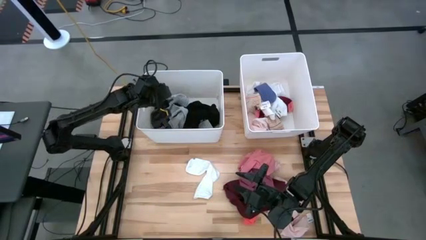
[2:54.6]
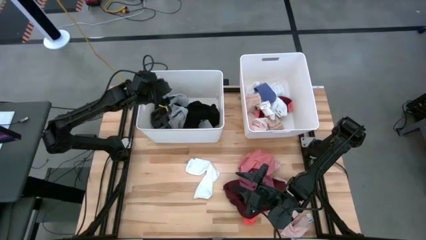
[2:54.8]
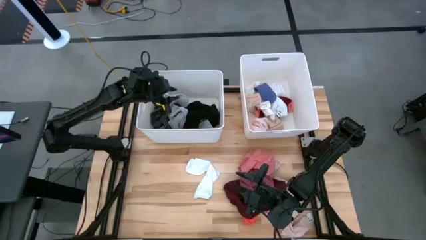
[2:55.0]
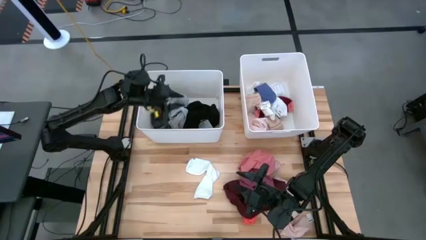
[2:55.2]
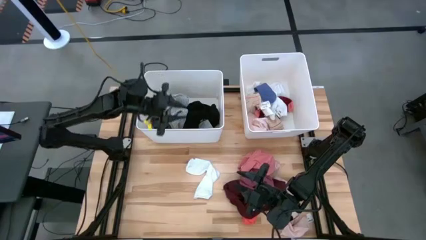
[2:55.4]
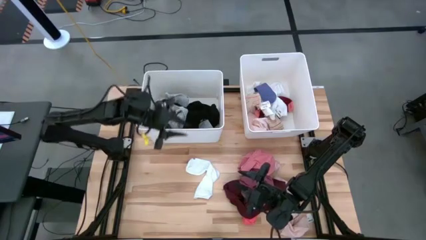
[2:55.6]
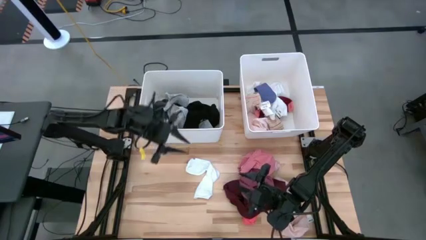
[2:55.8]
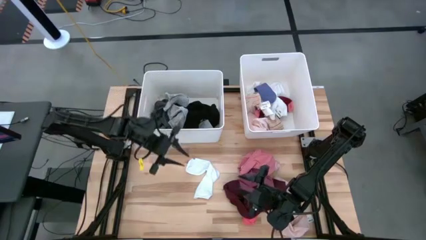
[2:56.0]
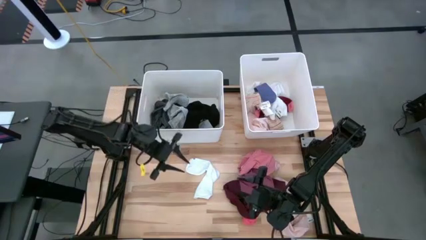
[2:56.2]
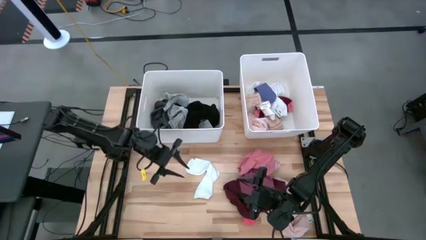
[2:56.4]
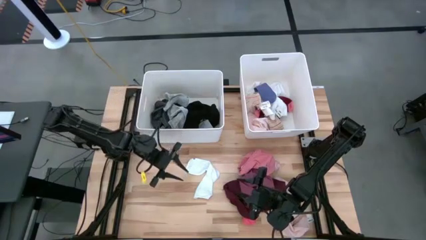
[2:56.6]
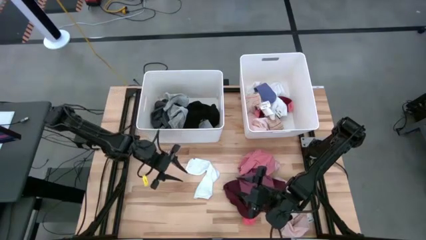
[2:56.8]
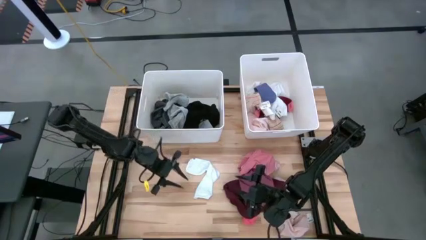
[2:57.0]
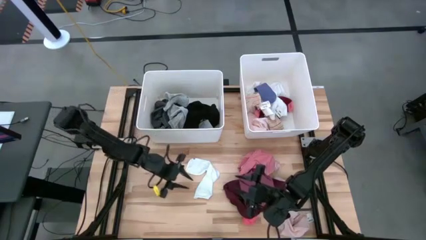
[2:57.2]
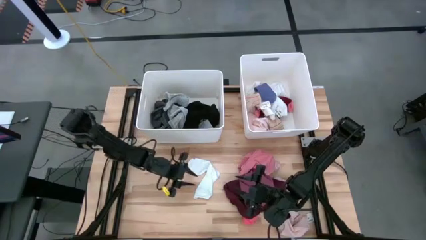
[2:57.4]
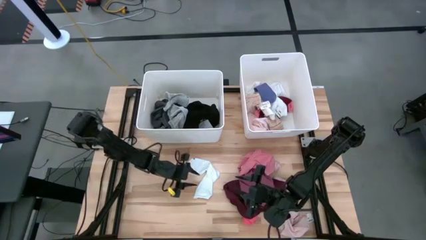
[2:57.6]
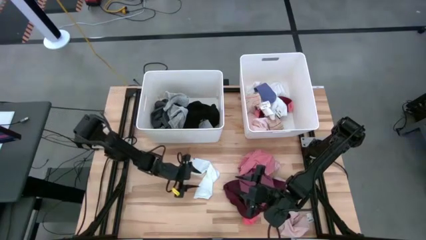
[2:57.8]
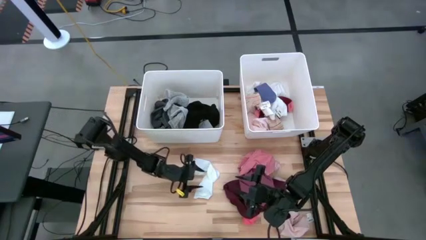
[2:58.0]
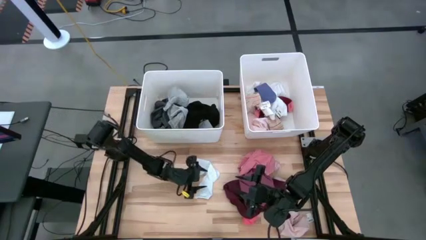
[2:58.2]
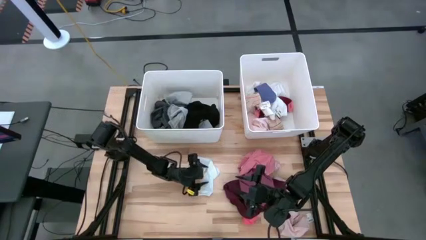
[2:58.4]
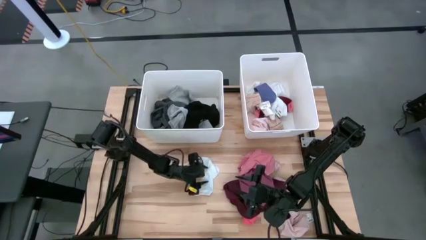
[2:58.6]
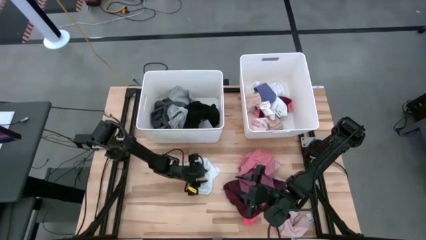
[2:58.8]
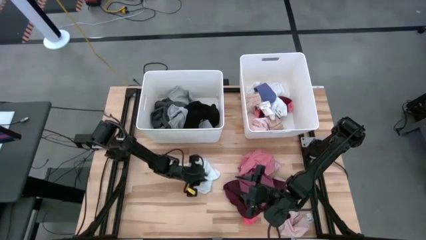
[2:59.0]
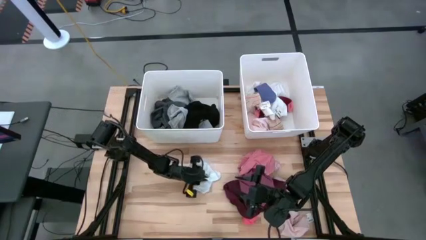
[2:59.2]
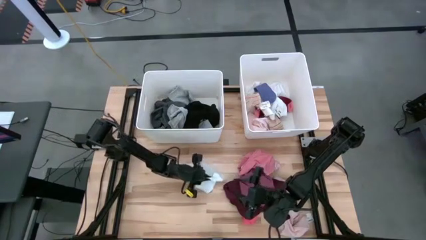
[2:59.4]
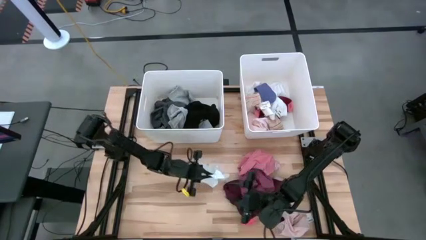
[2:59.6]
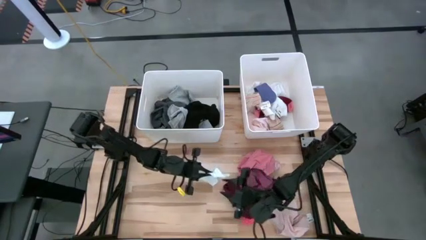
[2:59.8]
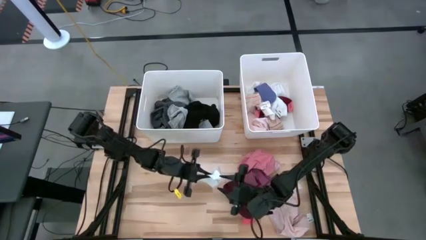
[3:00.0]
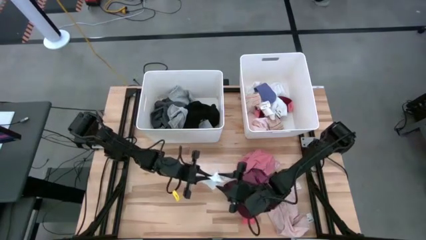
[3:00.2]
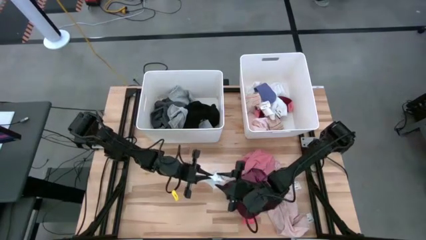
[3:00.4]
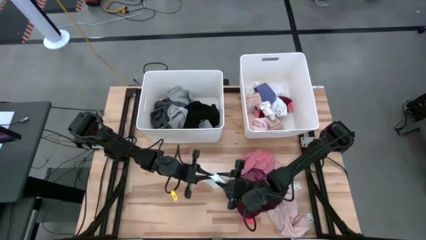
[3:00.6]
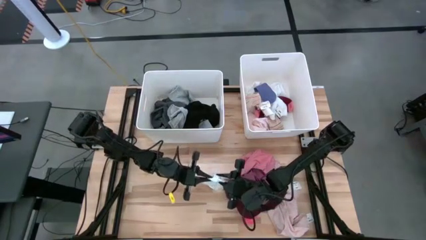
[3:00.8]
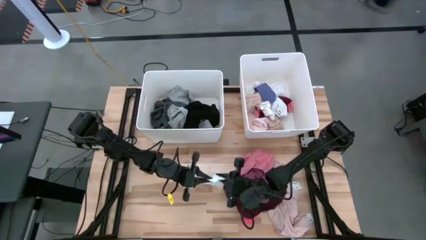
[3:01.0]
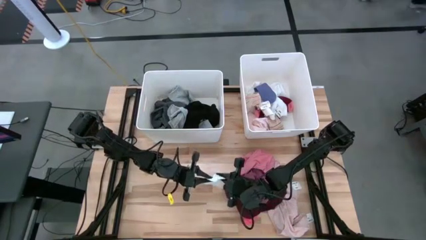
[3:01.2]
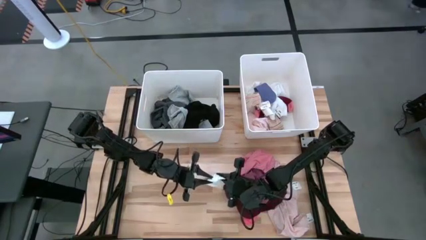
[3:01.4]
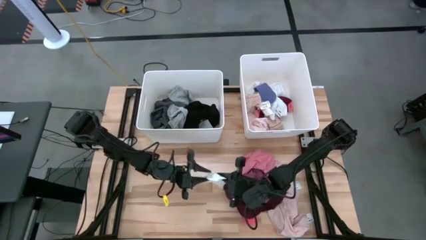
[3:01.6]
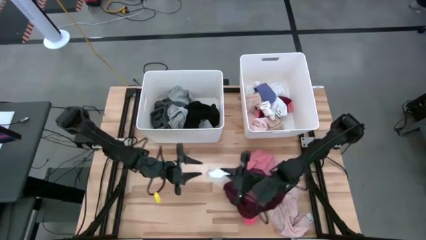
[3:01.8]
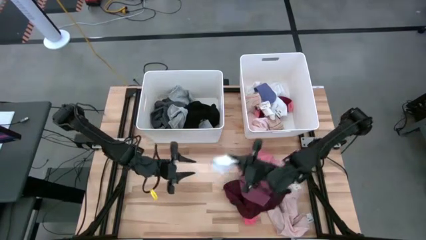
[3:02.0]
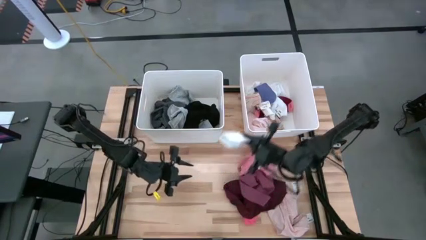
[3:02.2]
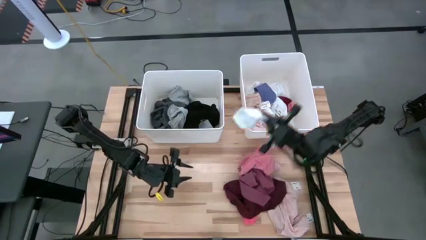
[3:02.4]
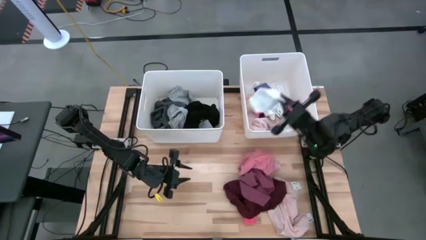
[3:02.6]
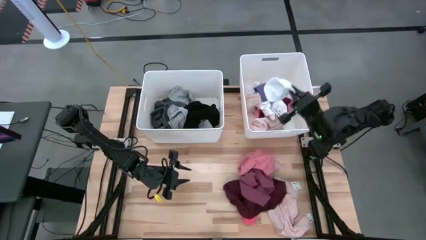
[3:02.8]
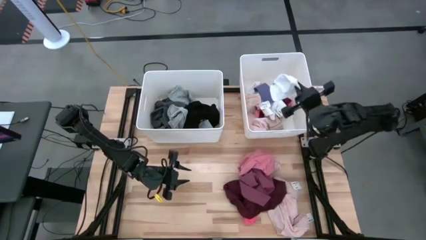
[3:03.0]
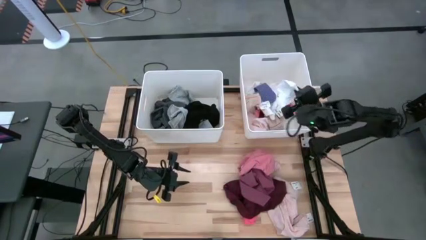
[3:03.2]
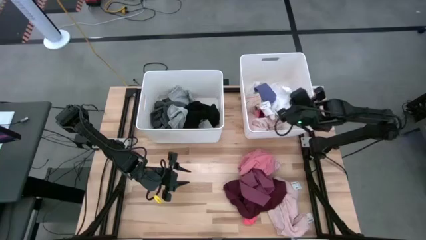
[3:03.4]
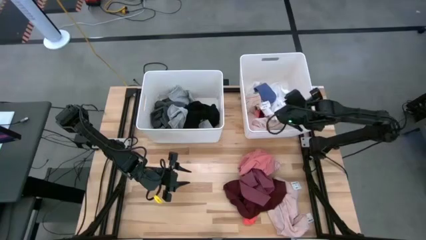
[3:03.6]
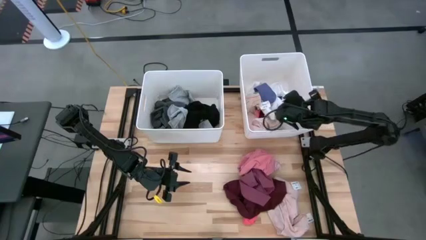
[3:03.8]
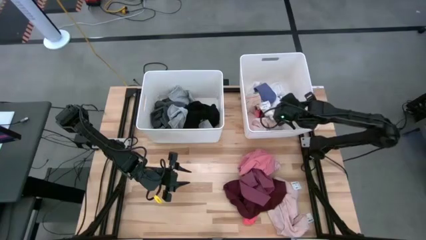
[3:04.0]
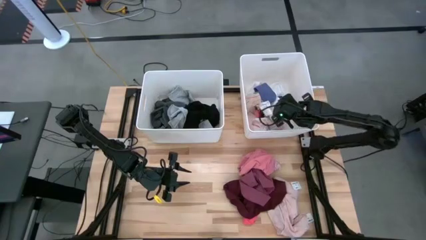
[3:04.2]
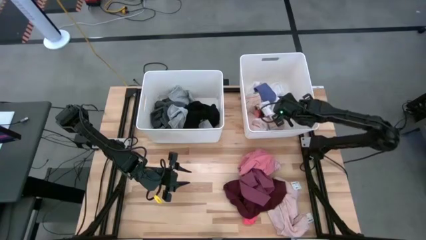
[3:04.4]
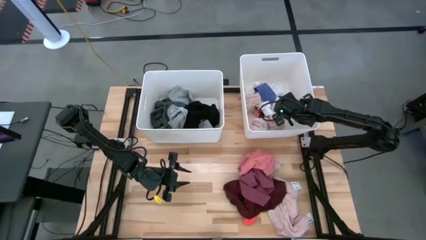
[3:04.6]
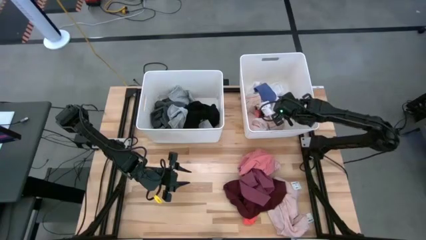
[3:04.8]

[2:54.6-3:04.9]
Task: Sort clothes
Put the white sock into the right white laundry organizer
